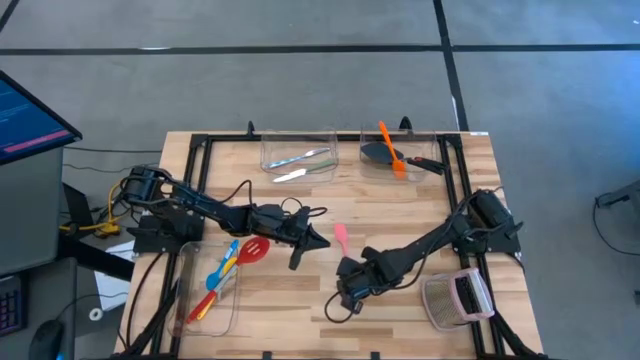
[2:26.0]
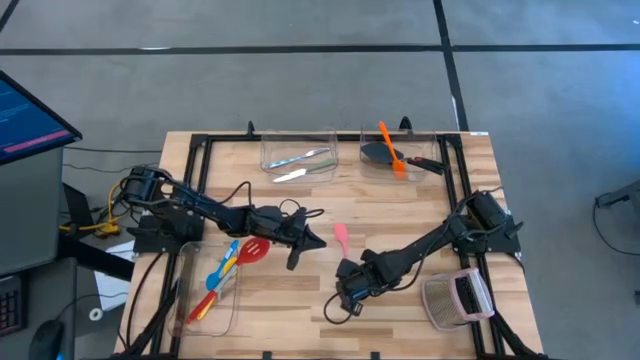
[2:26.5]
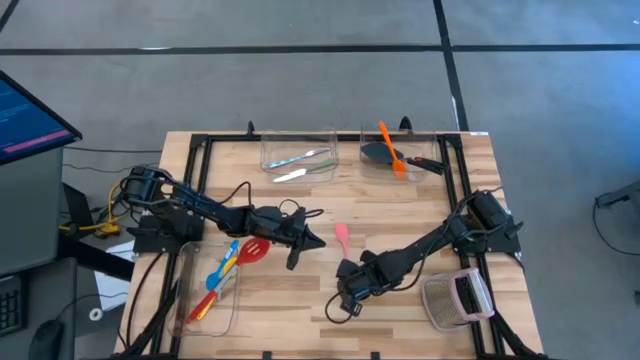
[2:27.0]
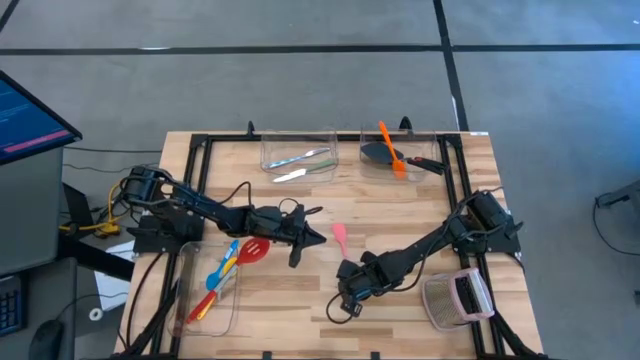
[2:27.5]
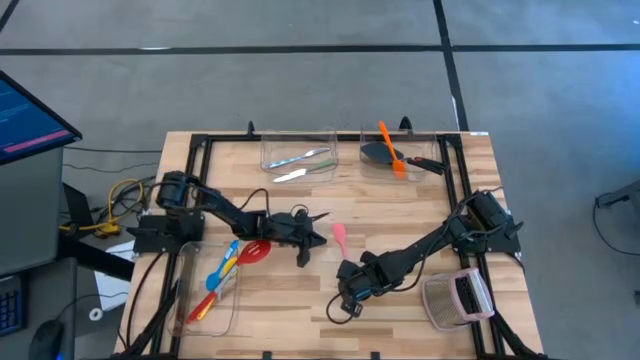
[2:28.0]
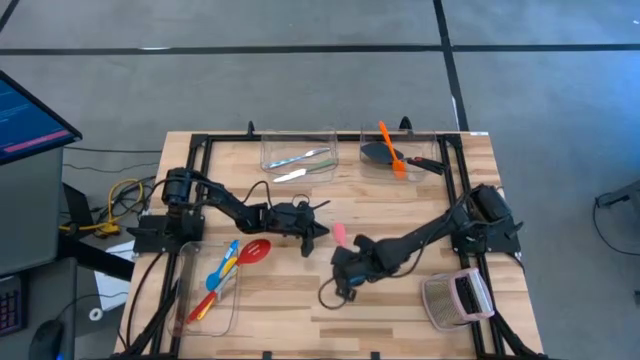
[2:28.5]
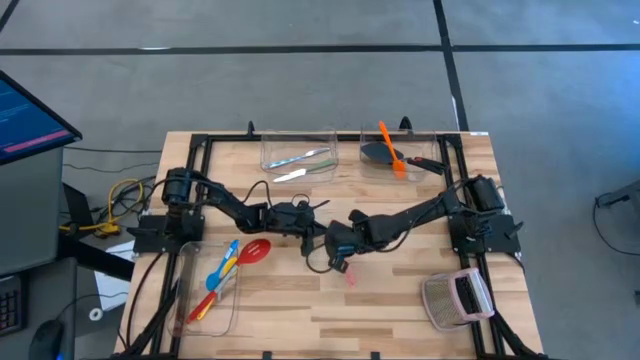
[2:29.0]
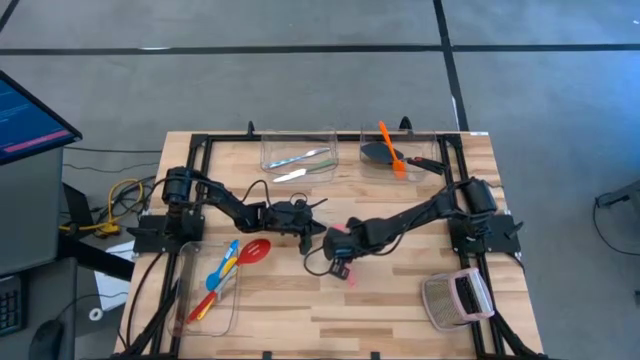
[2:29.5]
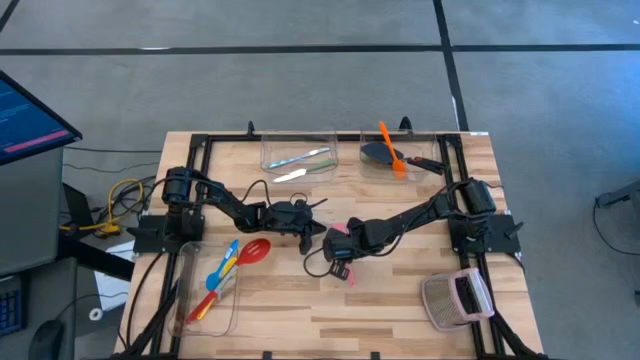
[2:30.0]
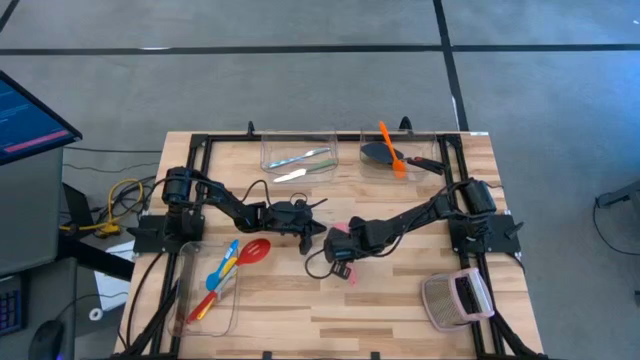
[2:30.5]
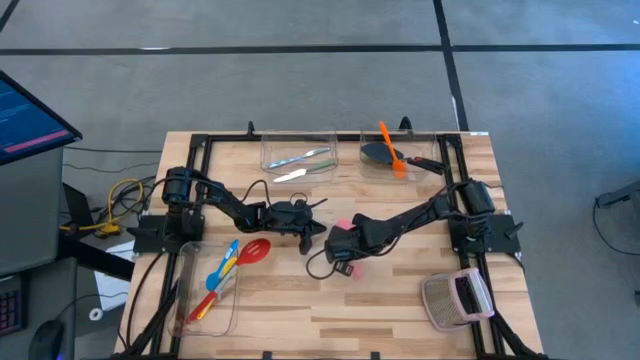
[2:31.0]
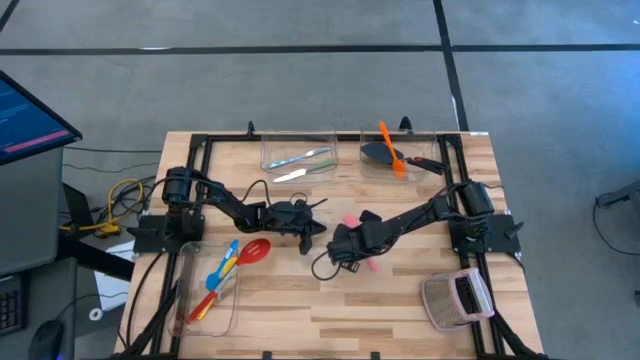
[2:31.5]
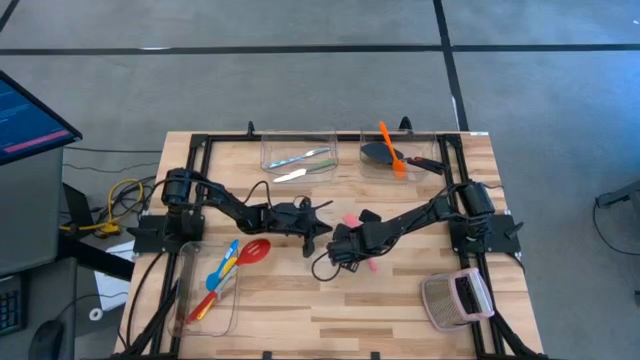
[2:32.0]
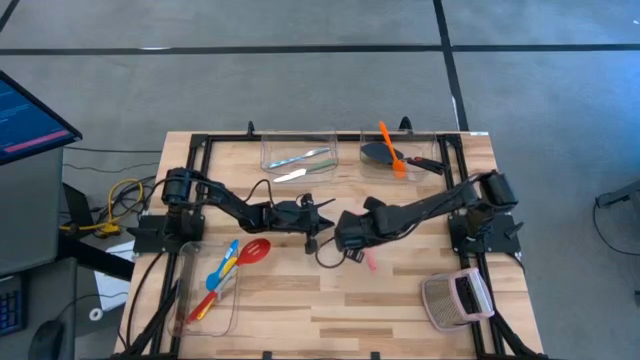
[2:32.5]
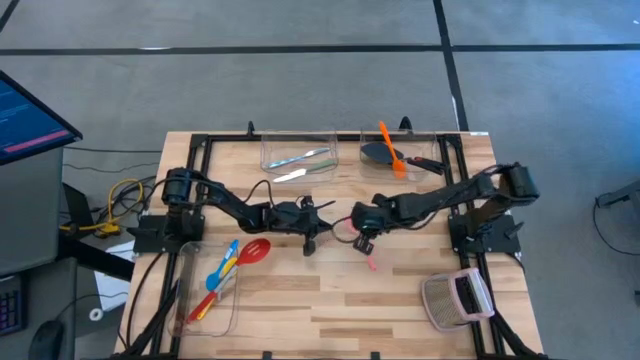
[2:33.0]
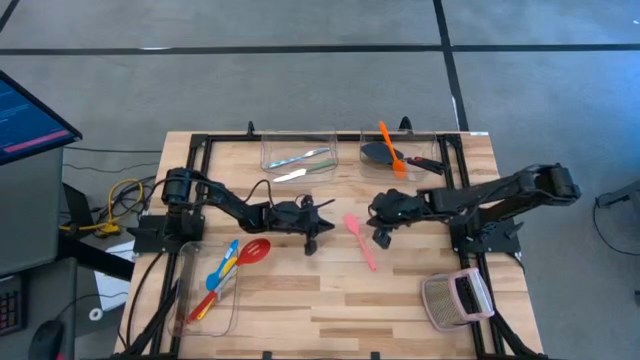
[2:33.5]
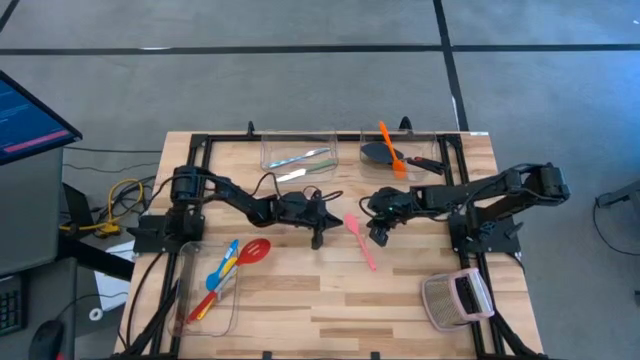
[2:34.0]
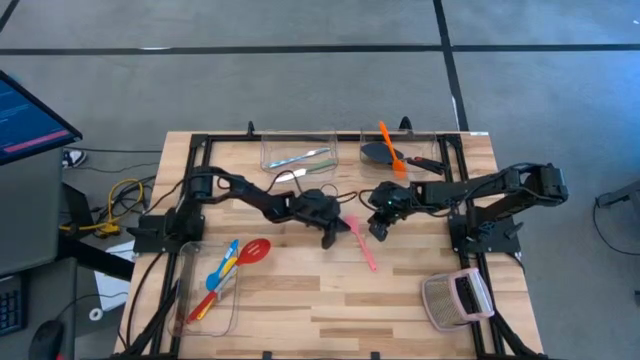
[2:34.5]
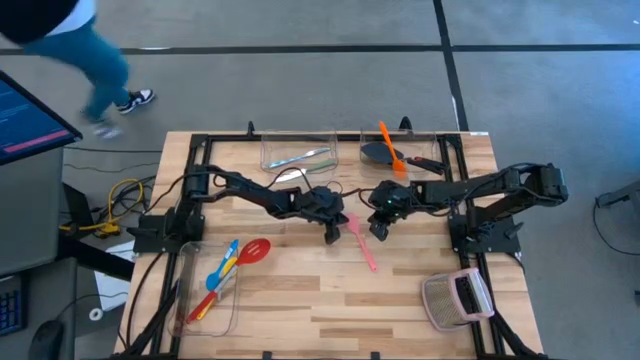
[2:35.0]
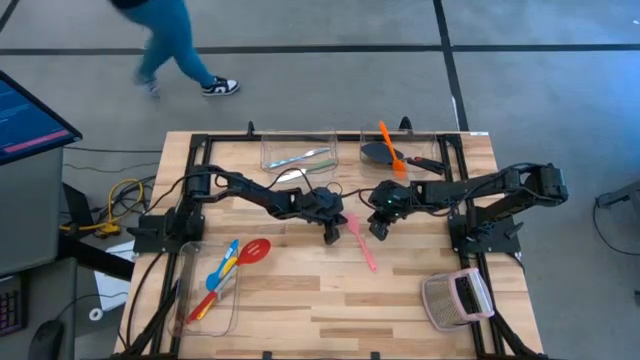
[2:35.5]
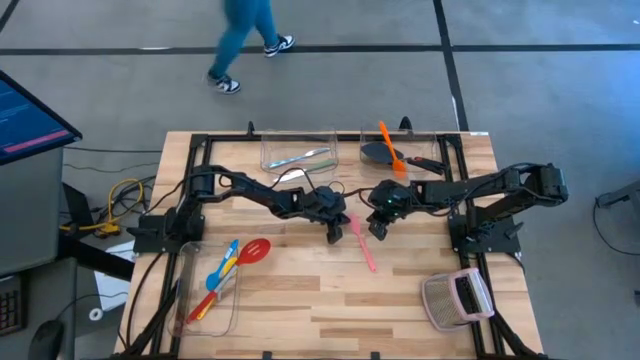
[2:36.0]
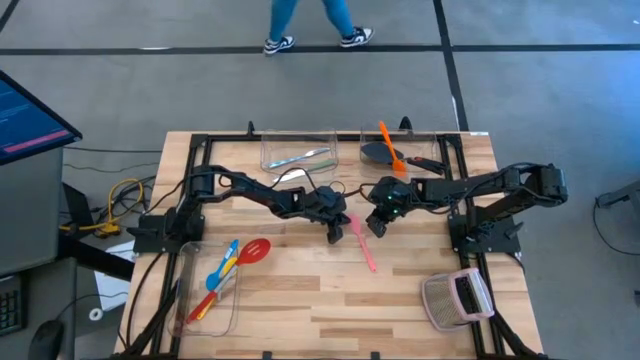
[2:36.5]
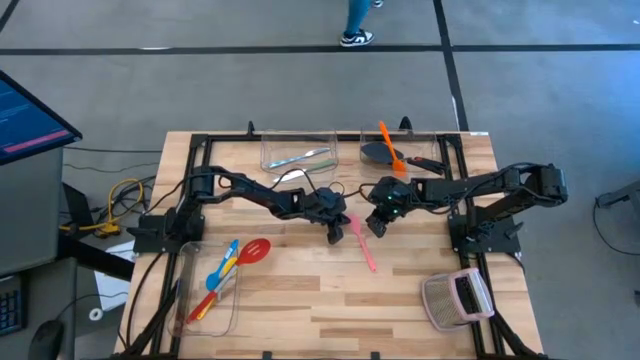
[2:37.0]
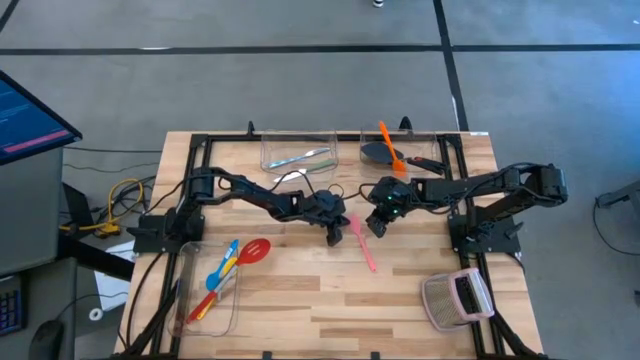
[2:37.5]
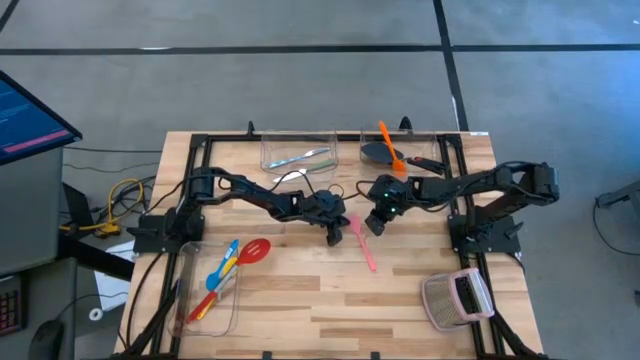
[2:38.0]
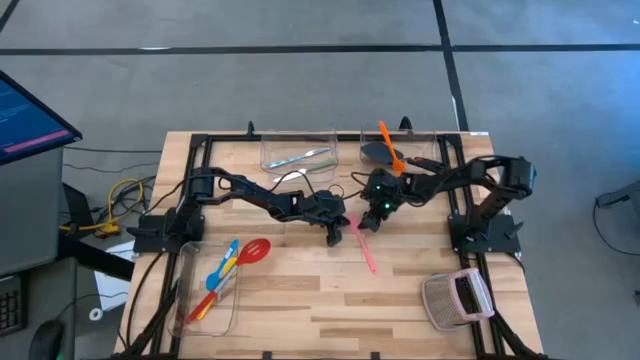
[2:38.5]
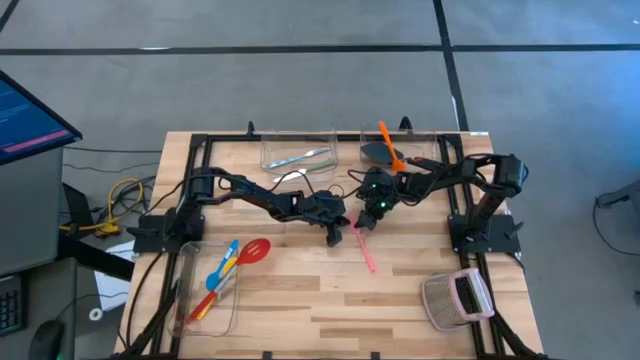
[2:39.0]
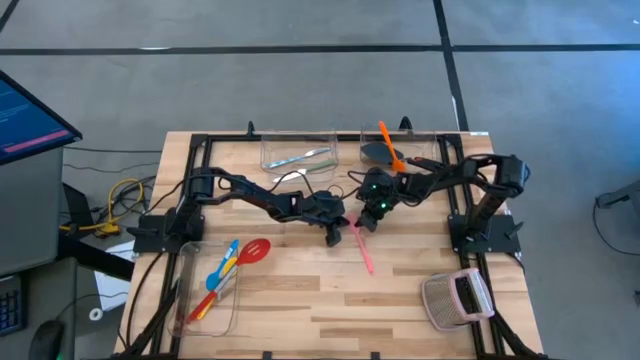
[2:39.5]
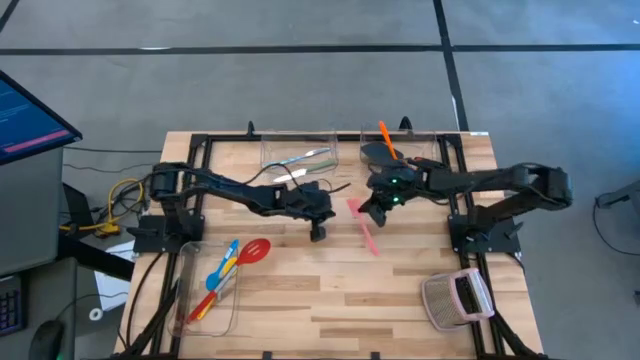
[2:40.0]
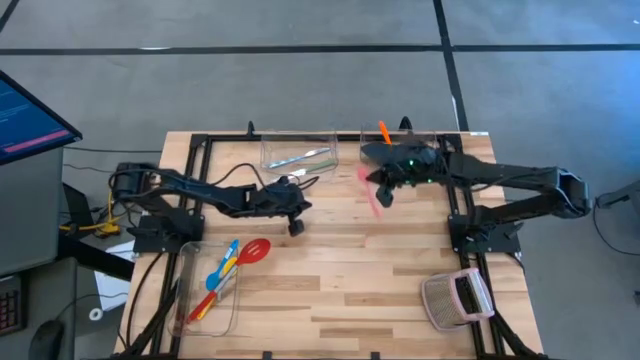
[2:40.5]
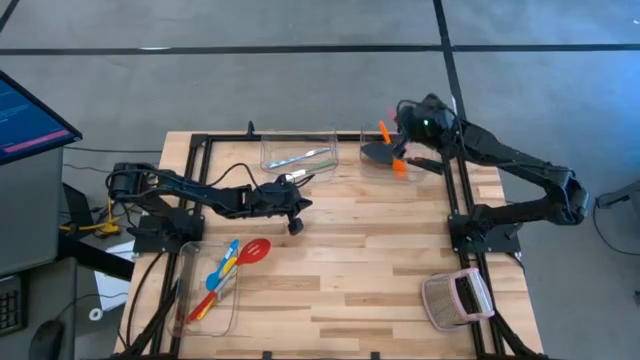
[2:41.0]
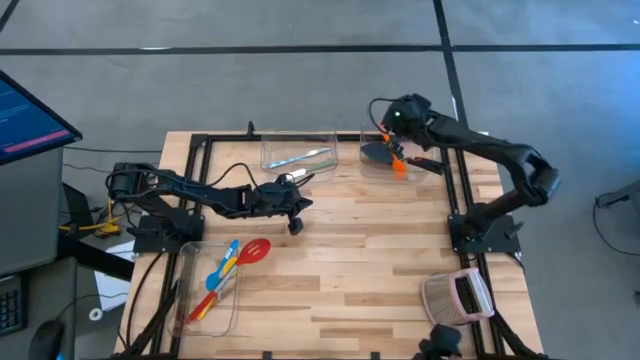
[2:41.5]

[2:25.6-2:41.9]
Task: Pick & Place Kitchen Items
Put the pink spatula into the top right transparent bin

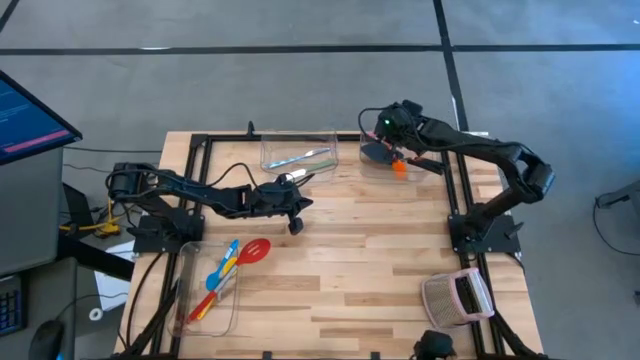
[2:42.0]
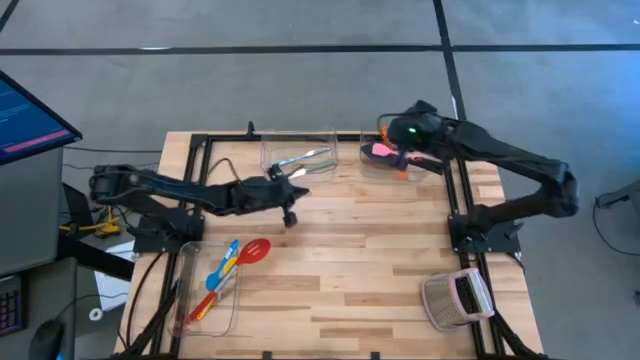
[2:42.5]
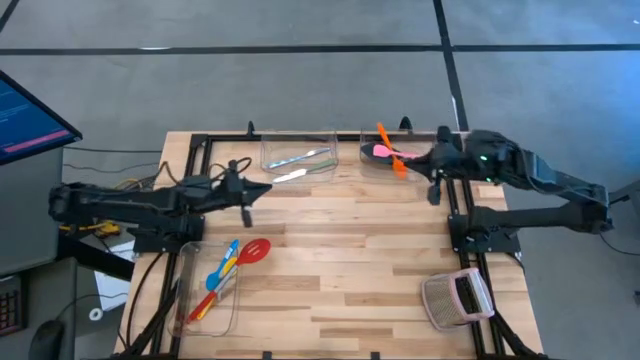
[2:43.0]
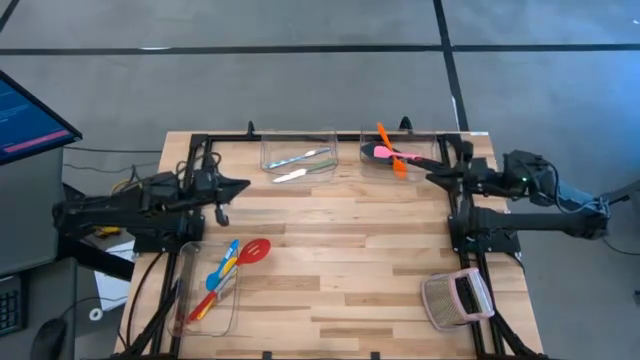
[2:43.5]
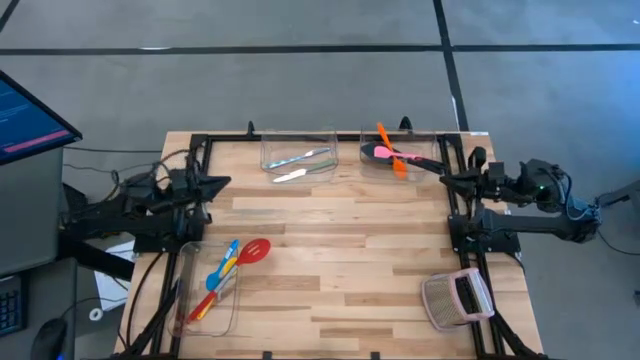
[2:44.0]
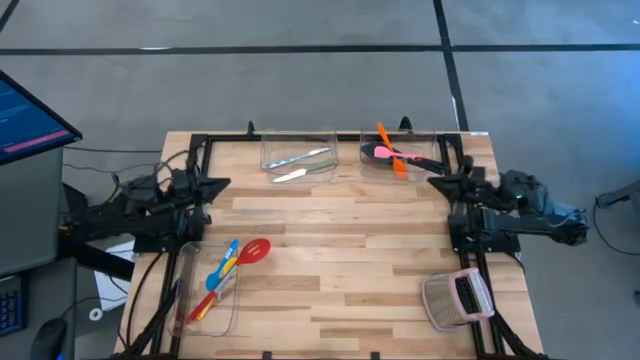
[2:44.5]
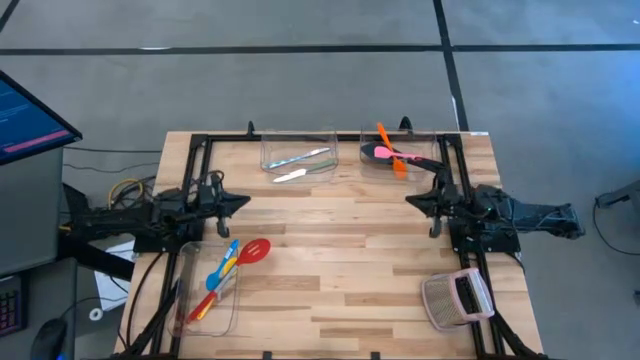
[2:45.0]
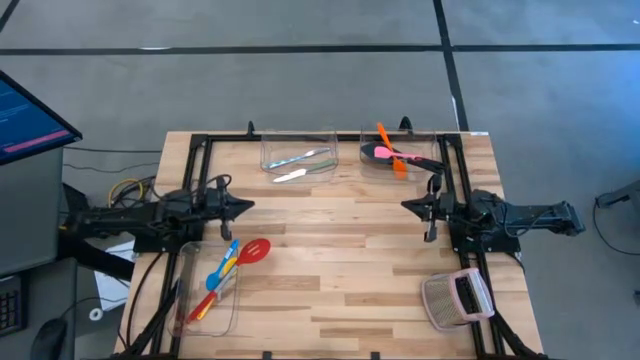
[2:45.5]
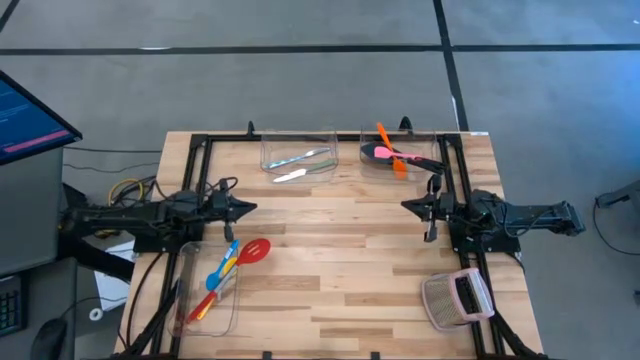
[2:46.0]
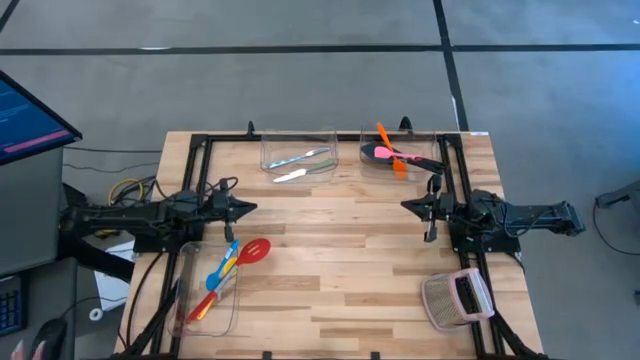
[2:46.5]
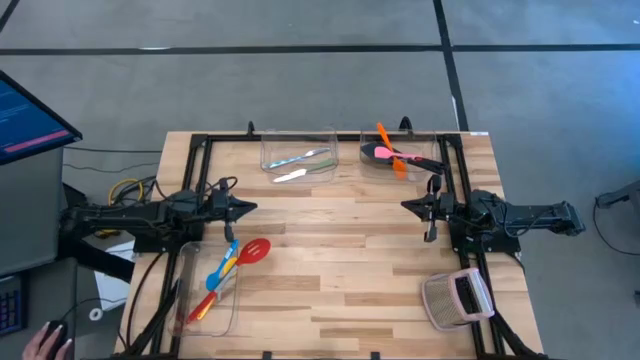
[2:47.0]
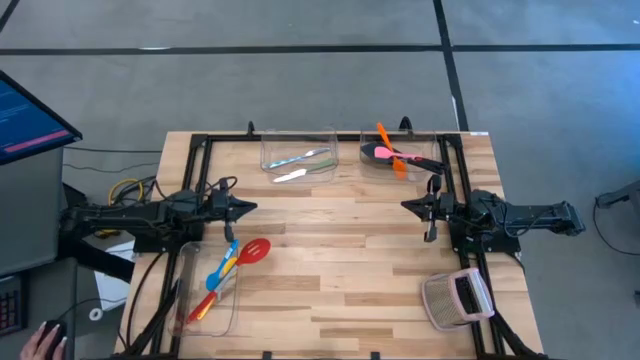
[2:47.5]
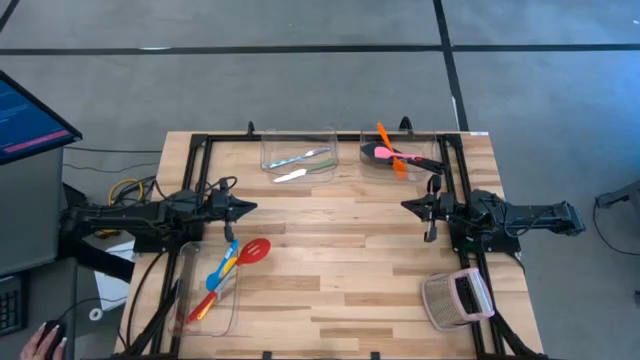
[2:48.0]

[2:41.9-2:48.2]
Return to Home Position
